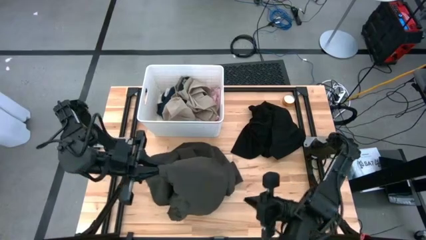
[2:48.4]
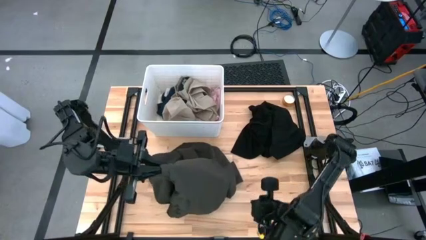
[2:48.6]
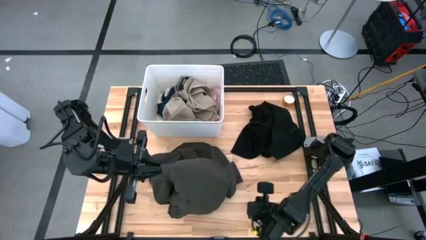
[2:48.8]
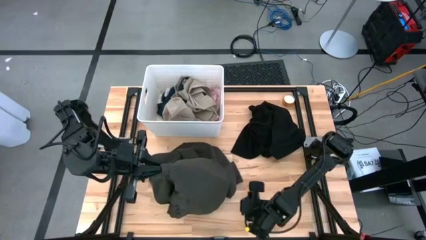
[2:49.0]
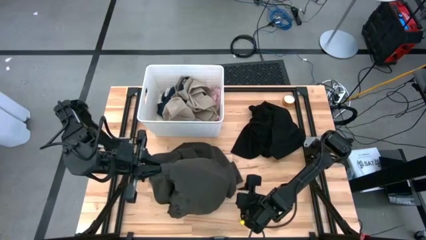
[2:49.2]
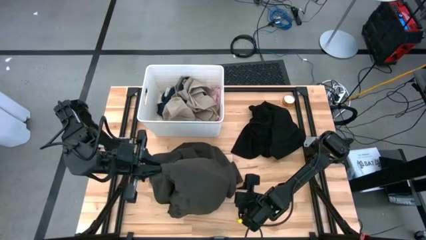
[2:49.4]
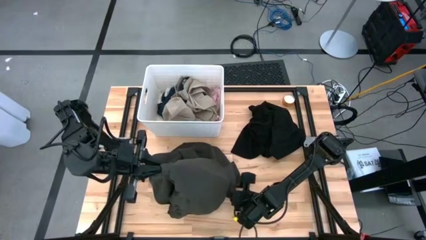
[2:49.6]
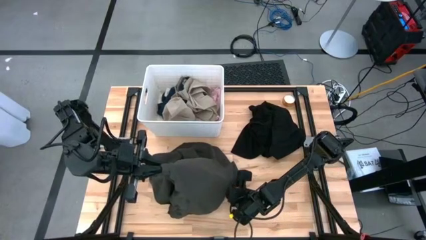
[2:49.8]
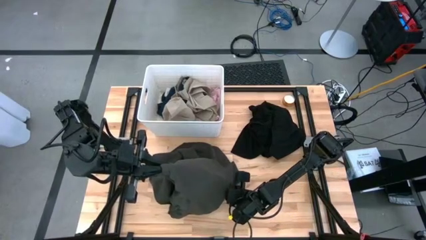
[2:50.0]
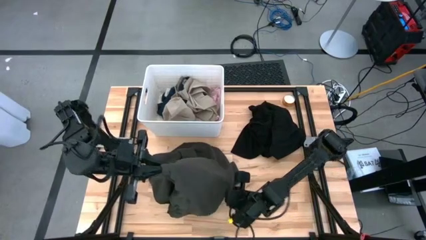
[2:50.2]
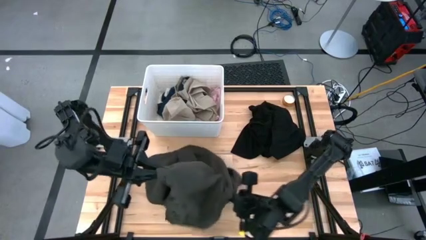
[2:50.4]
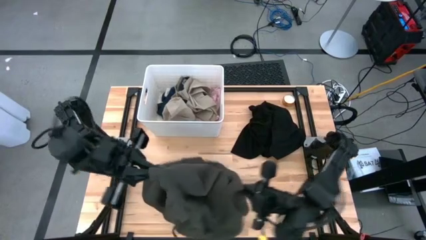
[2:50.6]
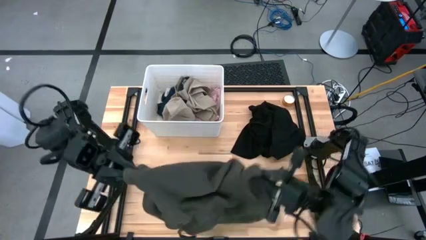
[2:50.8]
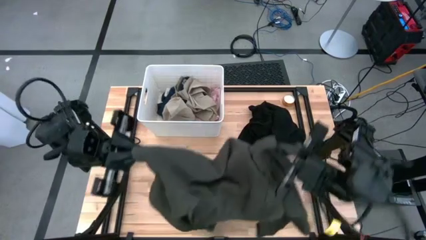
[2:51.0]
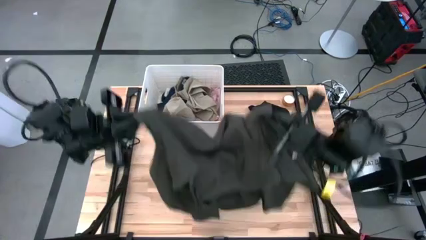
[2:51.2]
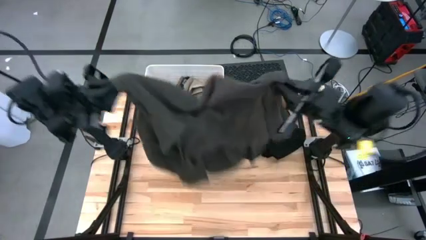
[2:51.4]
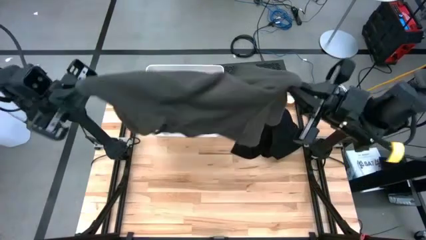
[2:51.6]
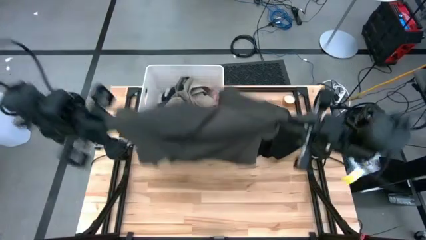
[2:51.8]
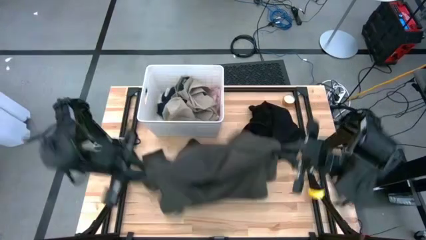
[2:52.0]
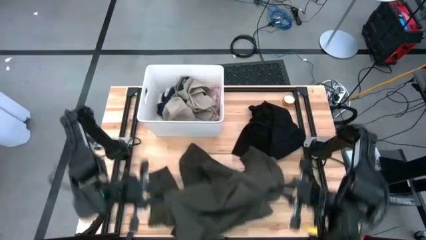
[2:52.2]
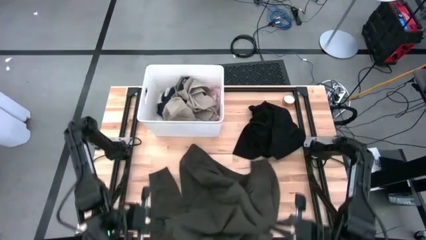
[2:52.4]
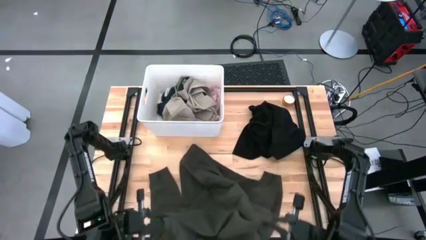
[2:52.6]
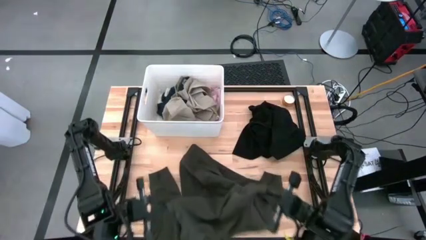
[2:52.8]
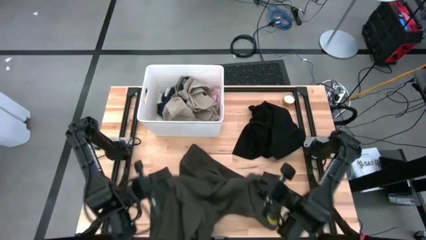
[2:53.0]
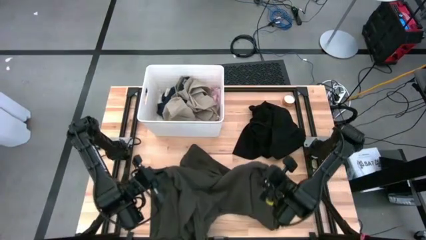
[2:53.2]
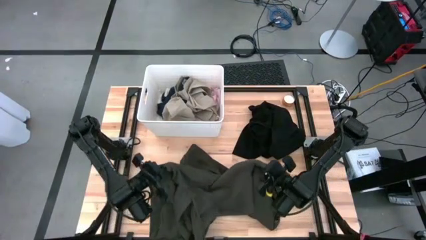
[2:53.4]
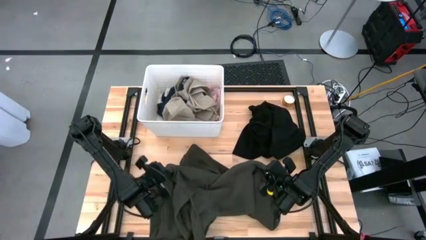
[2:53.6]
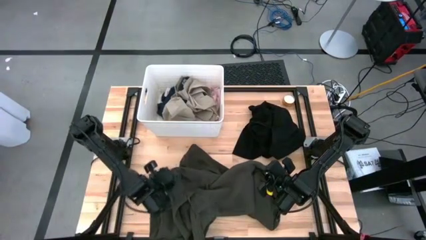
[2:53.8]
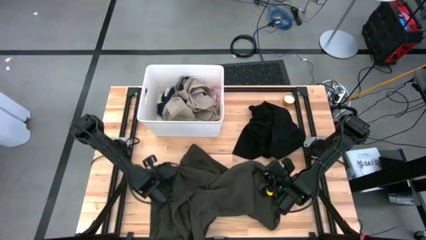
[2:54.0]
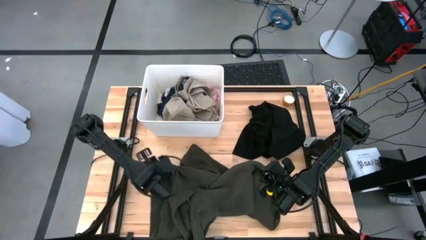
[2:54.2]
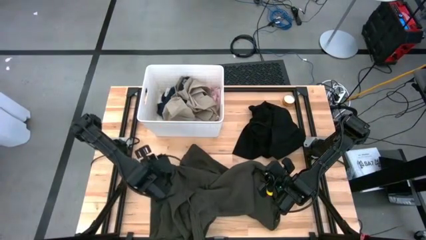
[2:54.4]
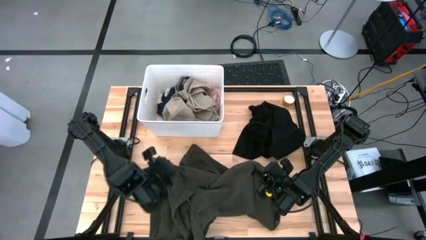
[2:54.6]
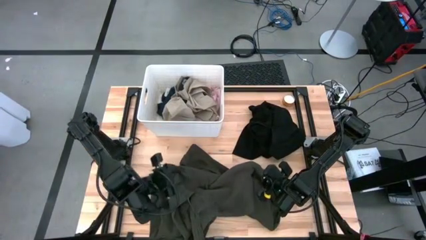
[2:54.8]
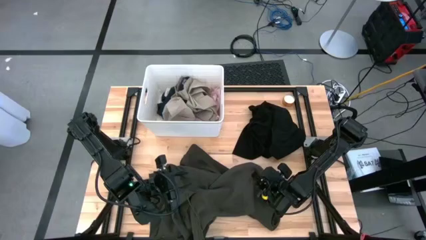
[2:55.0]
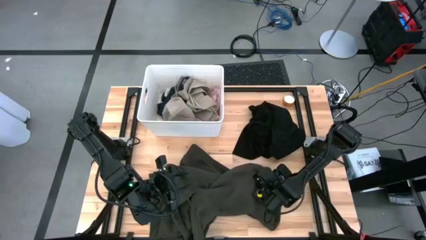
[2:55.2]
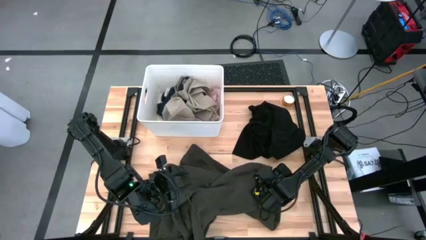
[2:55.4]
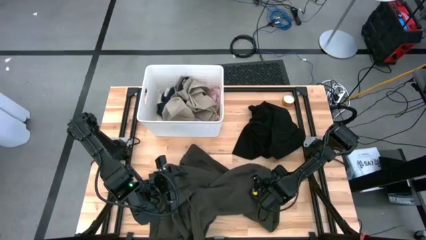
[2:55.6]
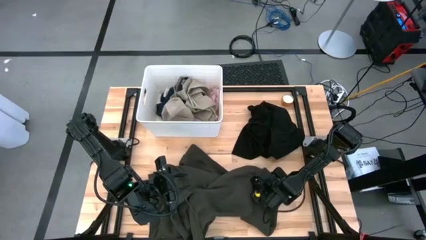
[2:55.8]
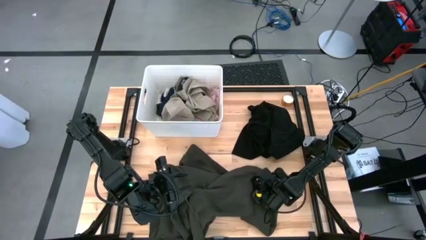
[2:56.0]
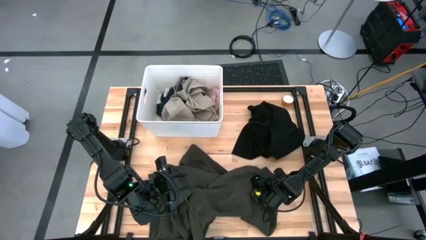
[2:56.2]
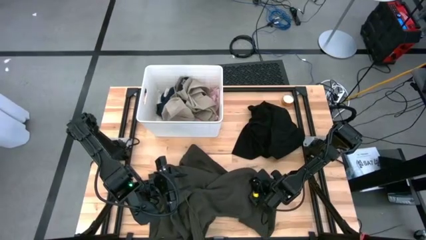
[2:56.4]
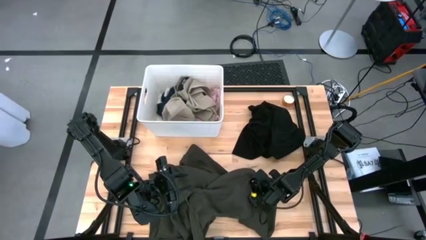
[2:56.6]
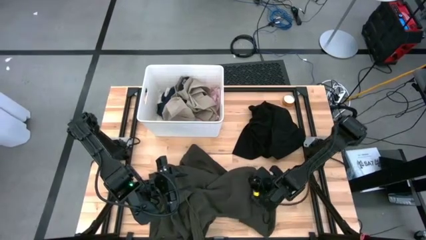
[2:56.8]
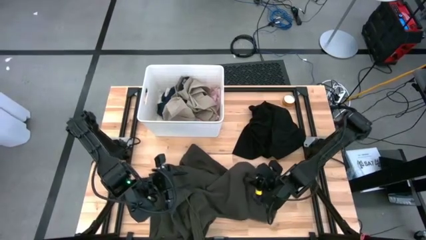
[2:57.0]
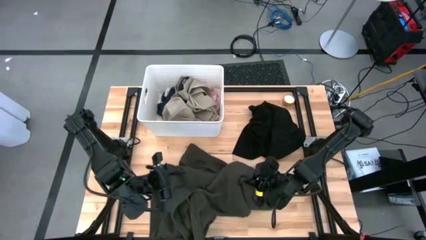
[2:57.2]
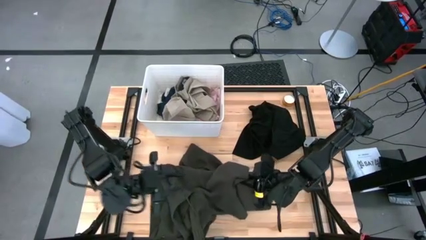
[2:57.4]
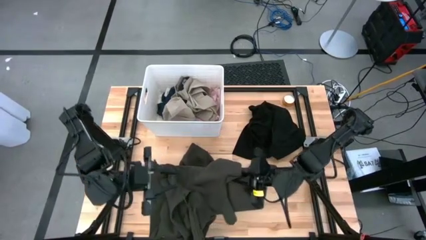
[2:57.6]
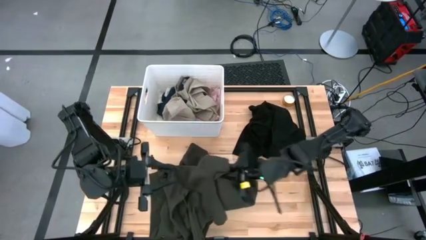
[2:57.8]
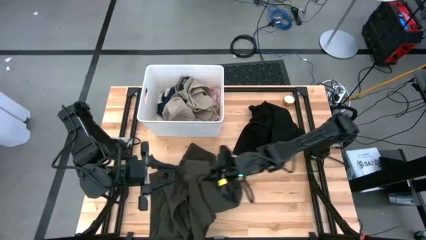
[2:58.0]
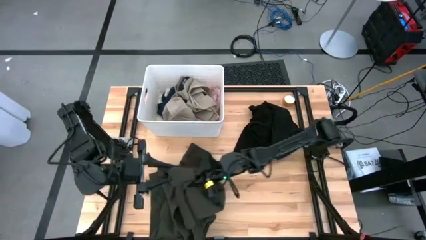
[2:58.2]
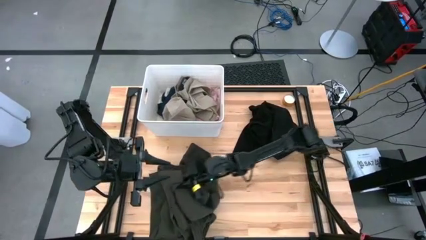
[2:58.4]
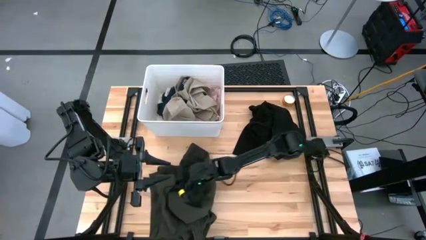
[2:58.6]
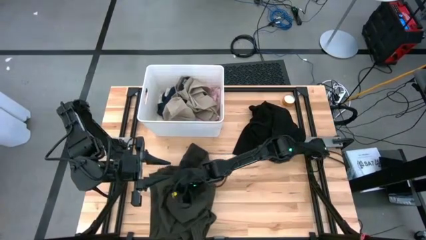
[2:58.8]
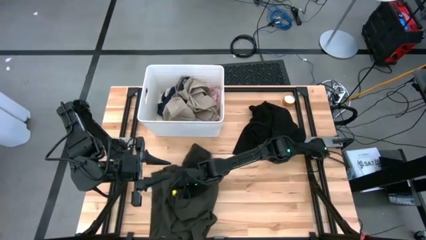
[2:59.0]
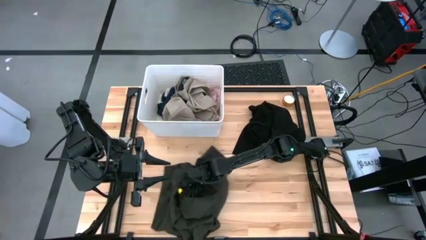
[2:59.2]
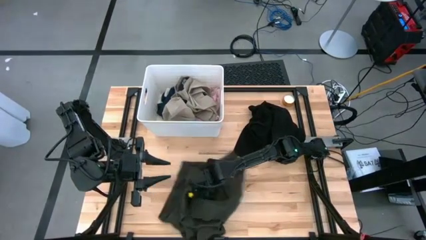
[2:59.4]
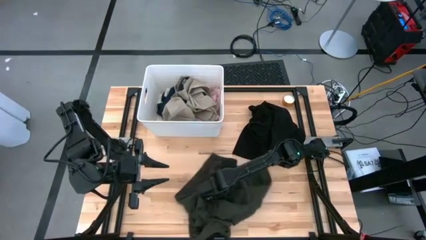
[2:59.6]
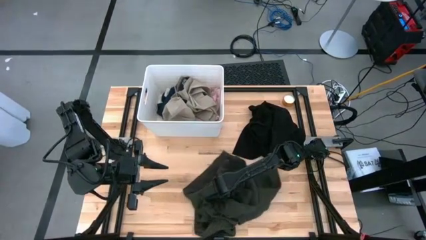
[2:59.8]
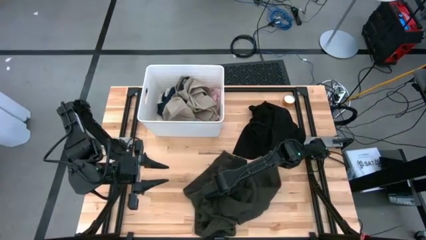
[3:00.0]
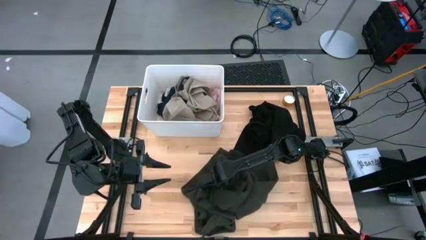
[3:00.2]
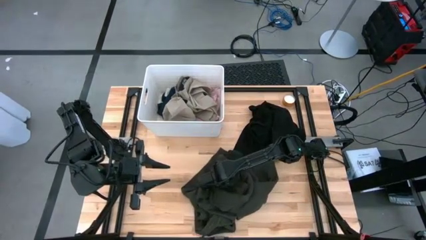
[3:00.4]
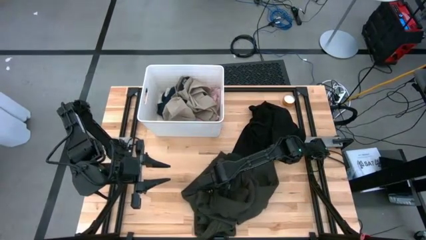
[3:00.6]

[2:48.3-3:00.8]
Task: Sort clothes
Put the black hoodie into the white laundry bin

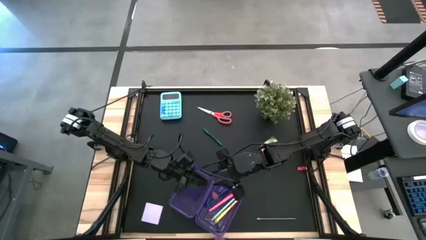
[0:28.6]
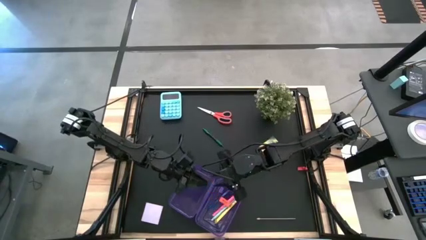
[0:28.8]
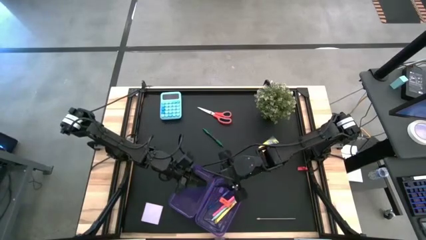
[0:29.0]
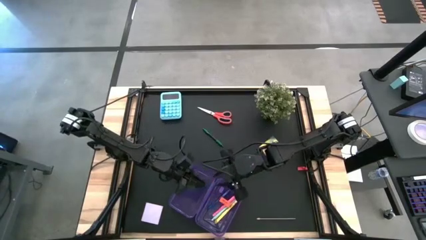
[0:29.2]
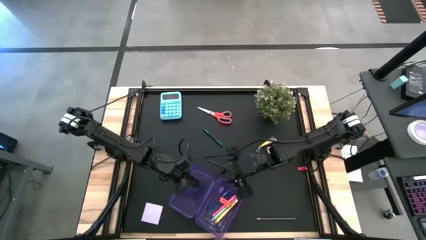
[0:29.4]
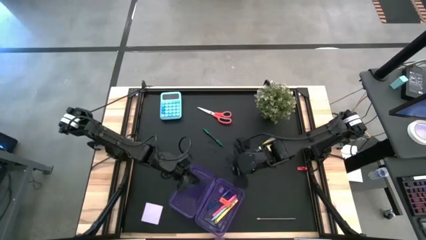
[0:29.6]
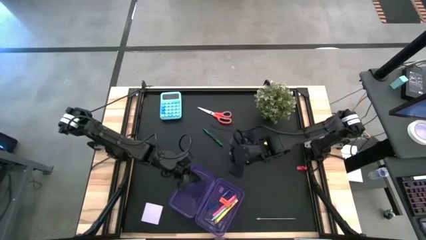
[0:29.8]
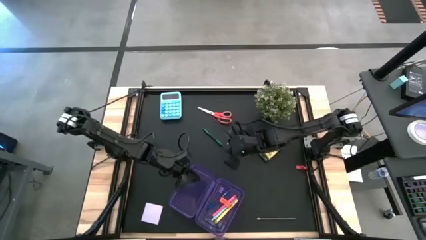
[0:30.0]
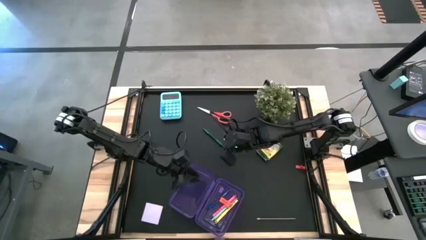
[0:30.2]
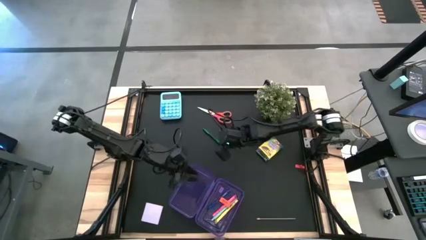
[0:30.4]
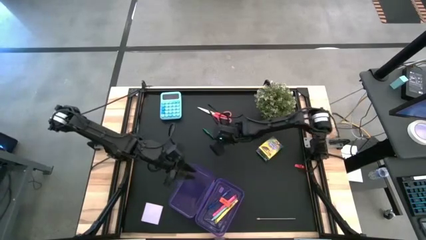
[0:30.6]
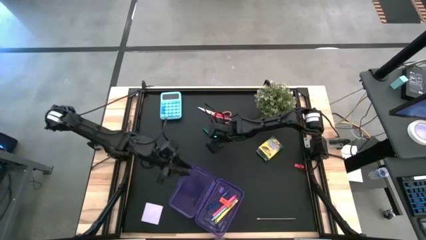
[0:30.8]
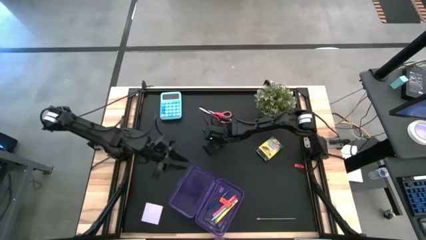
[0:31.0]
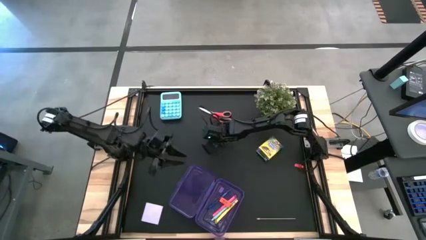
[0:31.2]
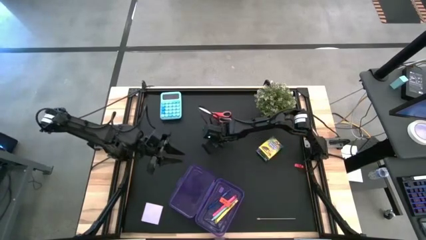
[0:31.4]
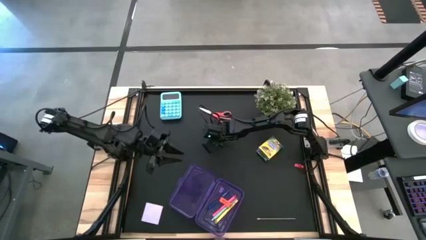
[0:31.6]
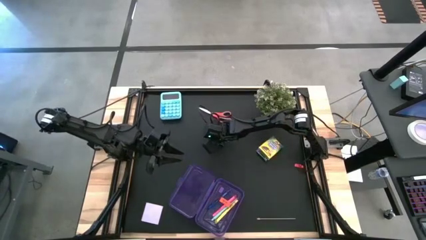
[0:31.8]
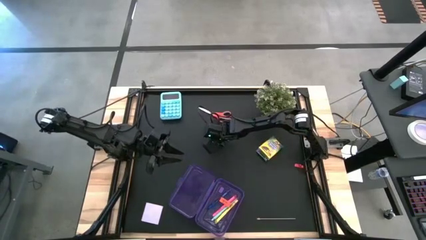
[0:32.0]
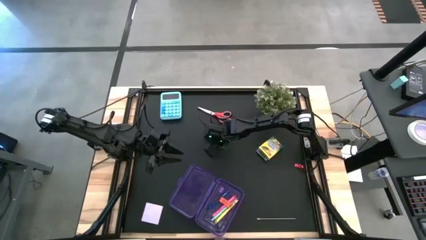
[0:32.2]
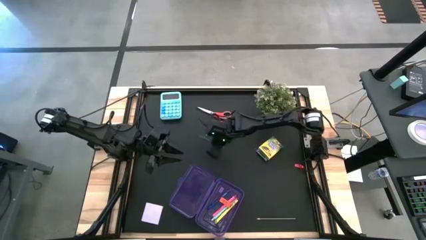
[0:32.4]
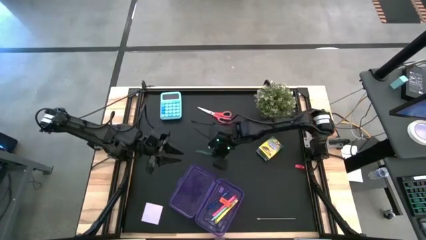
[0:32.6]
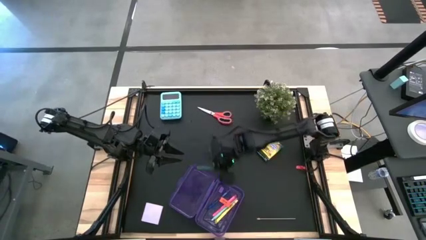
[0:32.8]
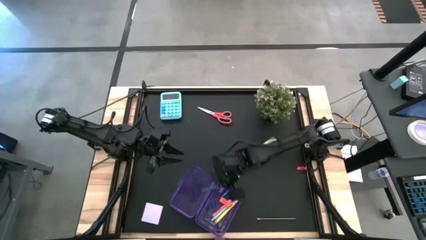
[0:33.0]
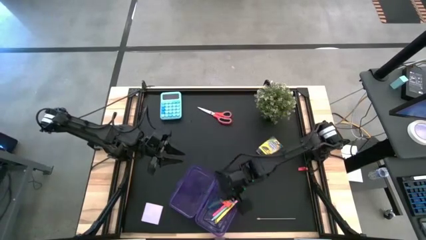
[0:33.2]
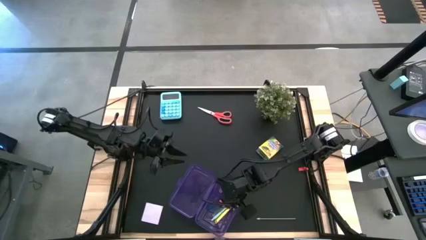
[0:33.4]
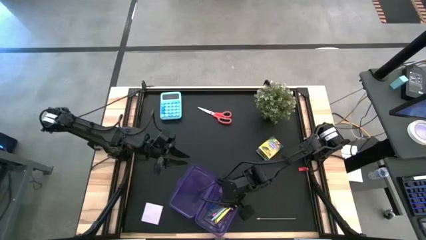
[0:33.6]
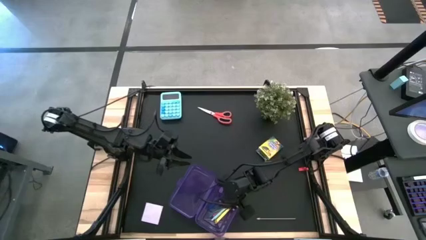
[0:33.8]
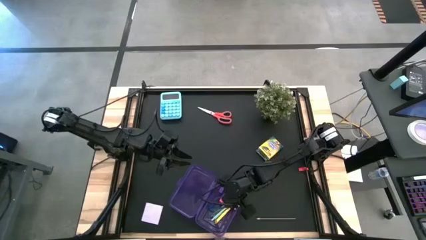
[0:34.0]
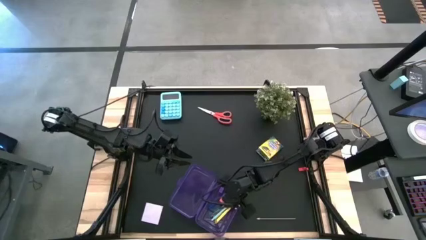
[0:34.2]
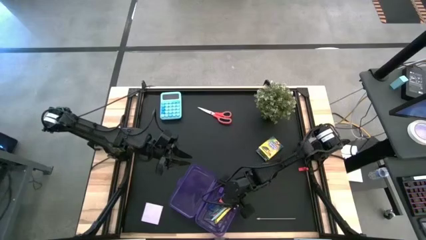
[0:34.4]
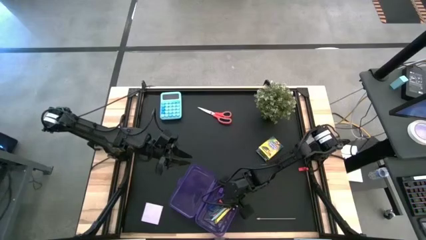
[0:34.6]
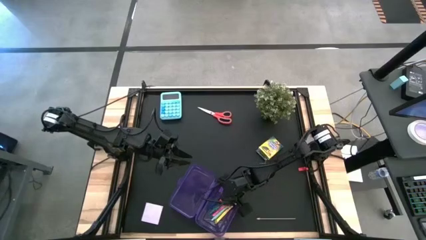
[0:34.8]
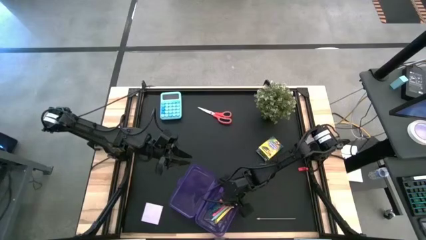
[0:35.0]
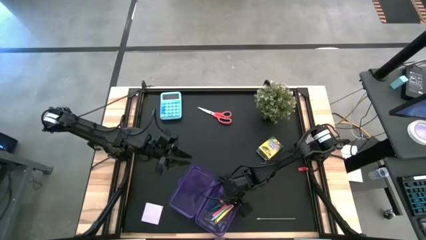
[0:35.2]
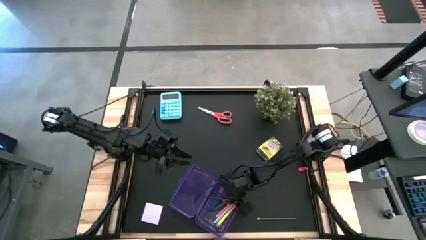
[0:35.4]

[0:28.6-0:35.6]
Task: Pack school essentials
Put the green pen into the purple supply box
